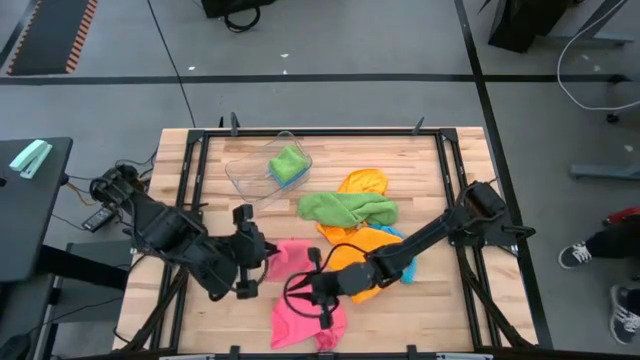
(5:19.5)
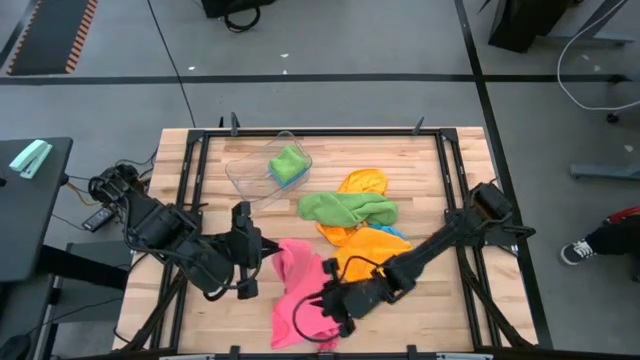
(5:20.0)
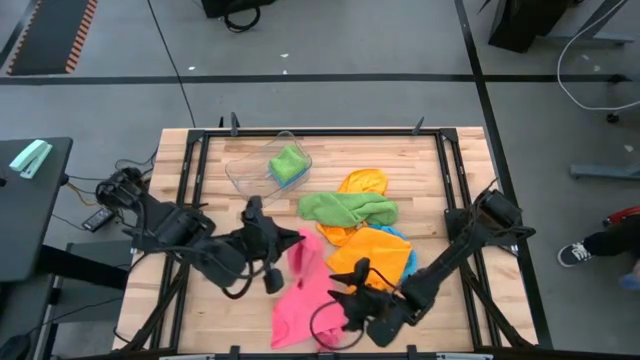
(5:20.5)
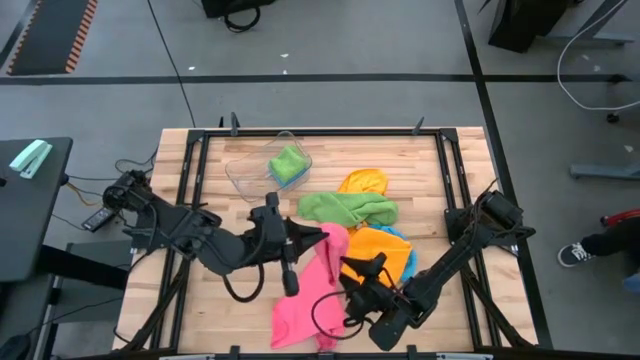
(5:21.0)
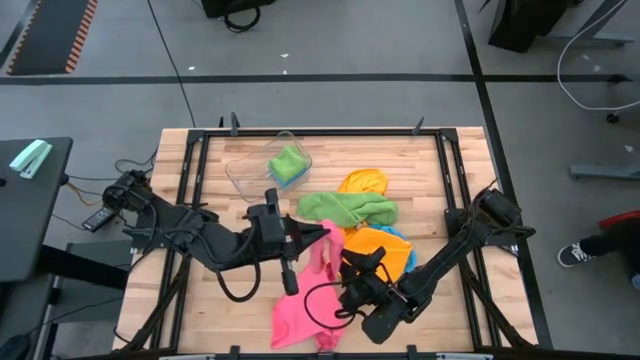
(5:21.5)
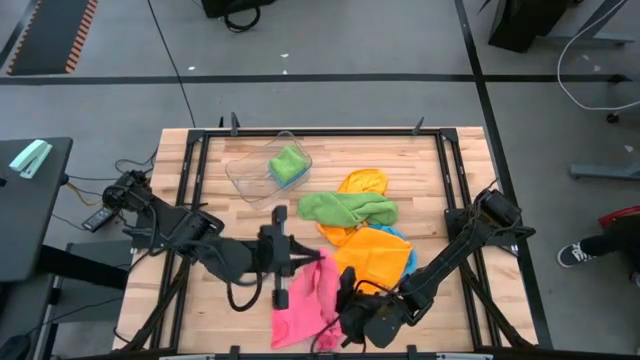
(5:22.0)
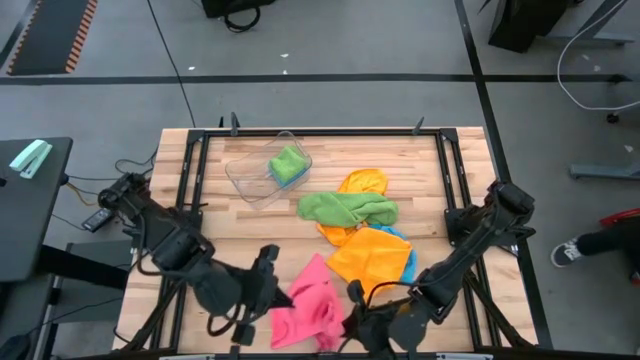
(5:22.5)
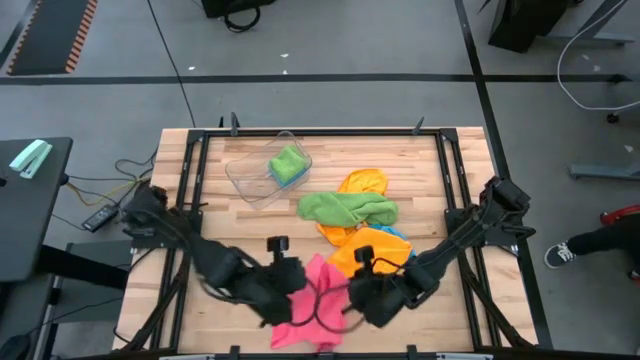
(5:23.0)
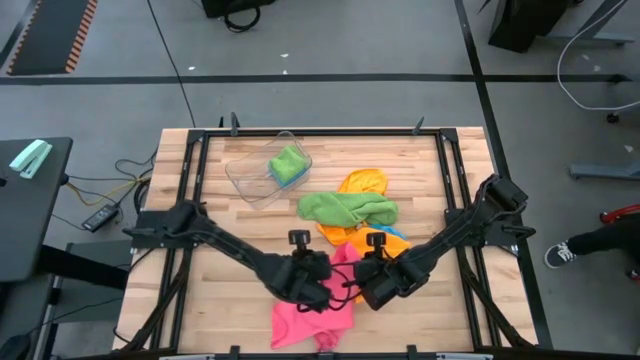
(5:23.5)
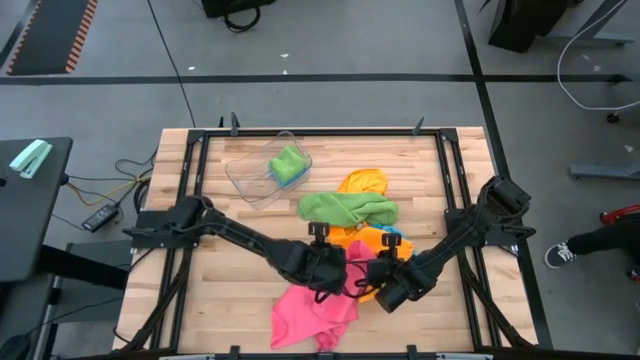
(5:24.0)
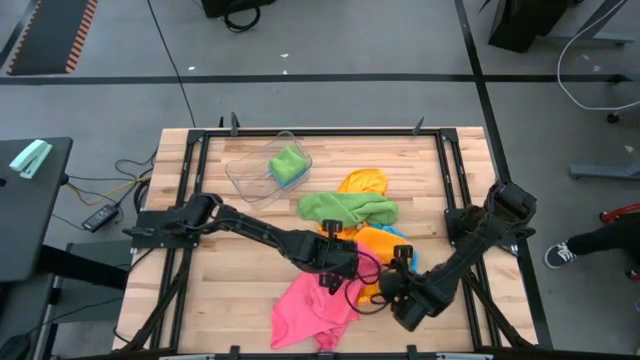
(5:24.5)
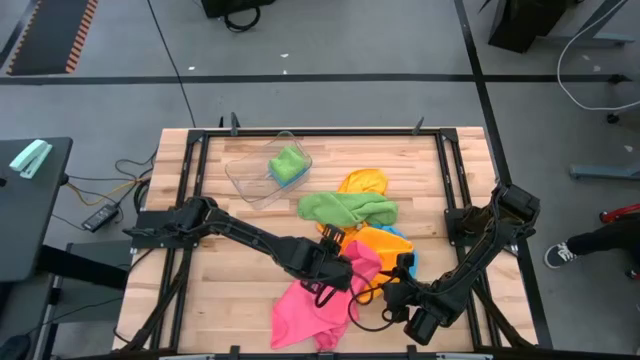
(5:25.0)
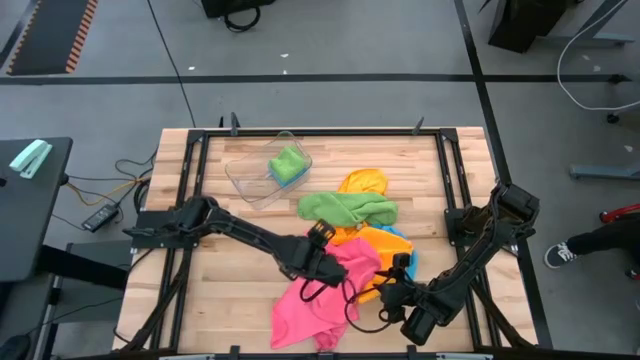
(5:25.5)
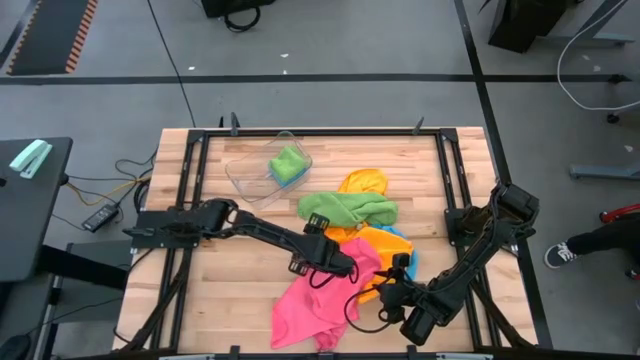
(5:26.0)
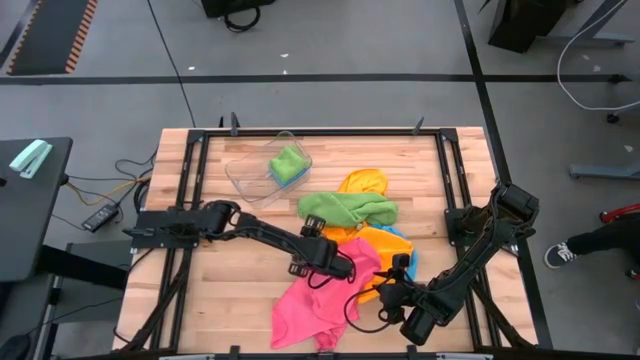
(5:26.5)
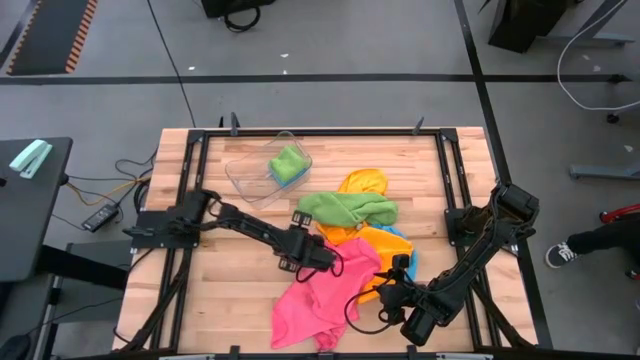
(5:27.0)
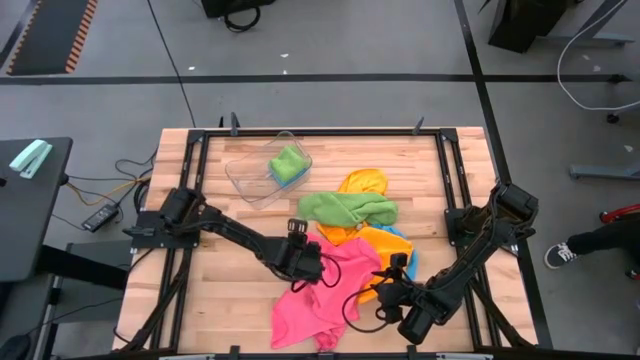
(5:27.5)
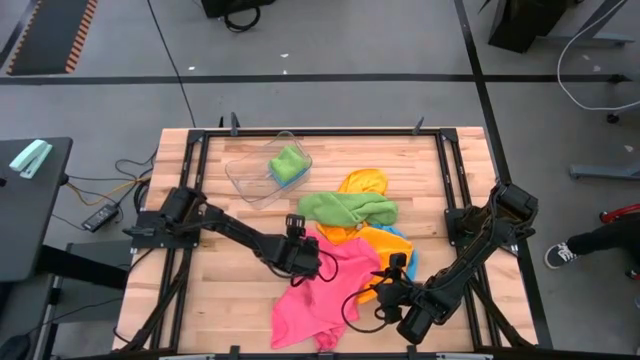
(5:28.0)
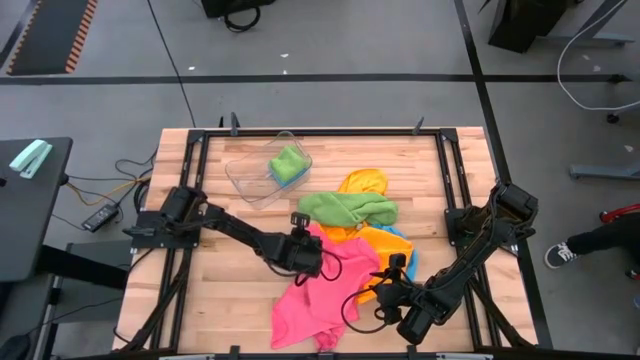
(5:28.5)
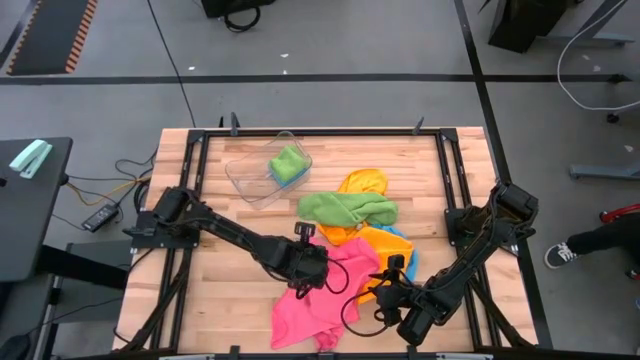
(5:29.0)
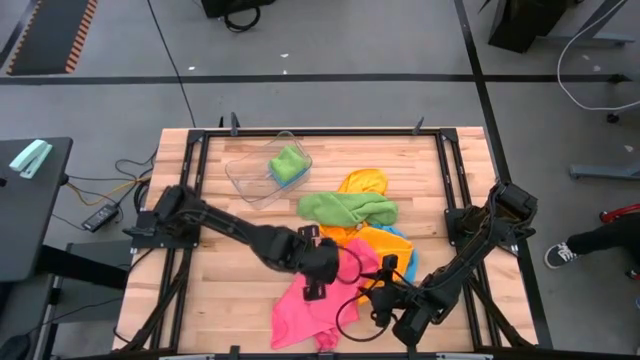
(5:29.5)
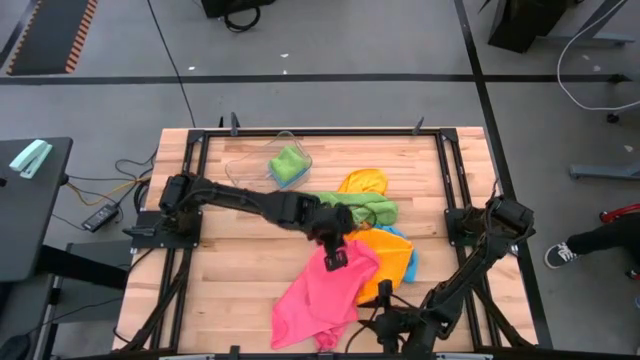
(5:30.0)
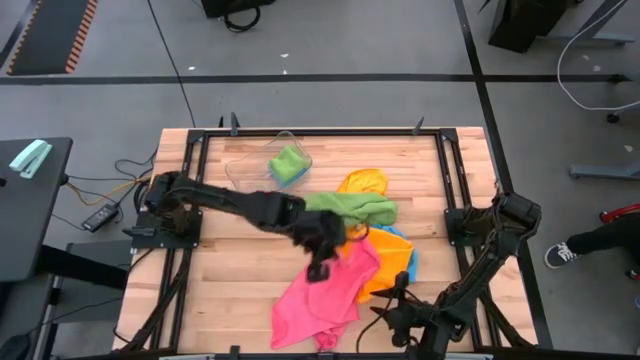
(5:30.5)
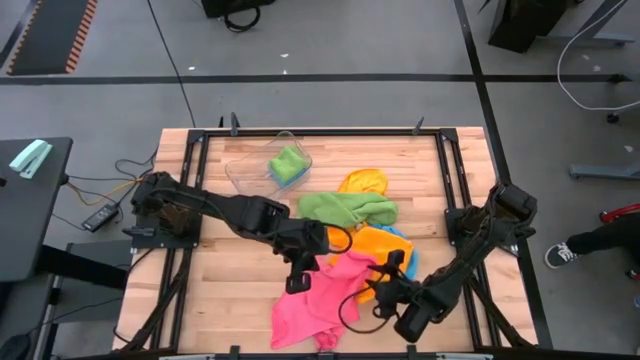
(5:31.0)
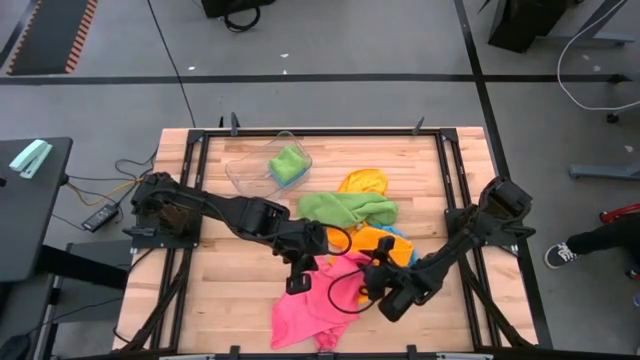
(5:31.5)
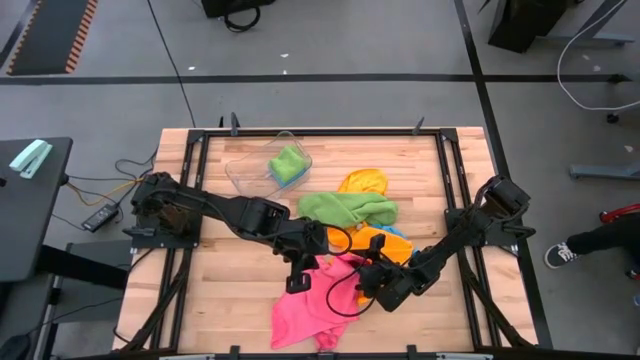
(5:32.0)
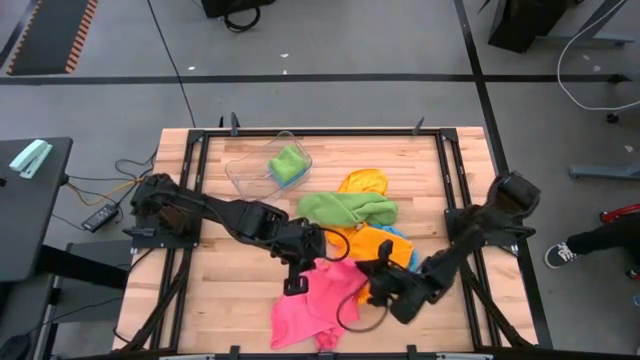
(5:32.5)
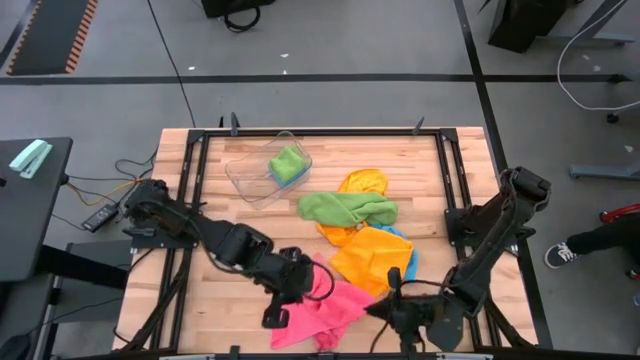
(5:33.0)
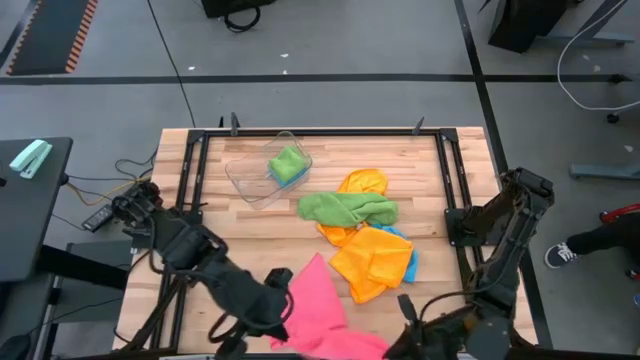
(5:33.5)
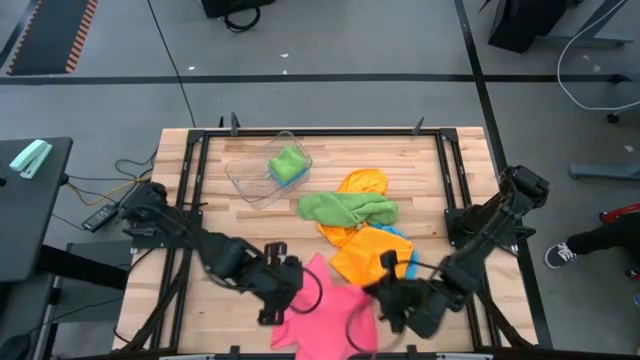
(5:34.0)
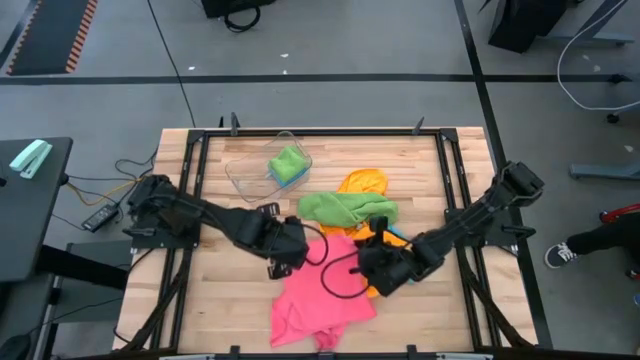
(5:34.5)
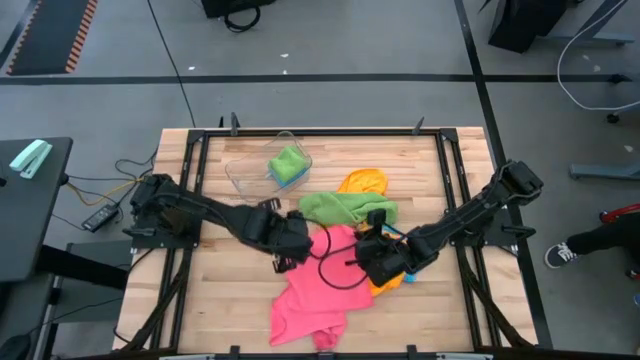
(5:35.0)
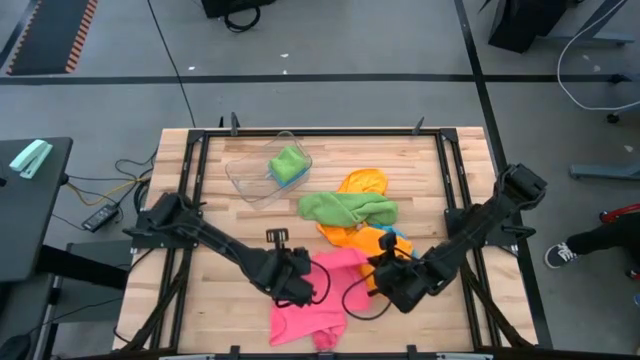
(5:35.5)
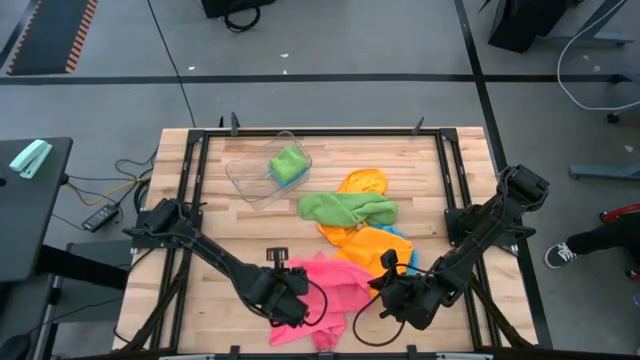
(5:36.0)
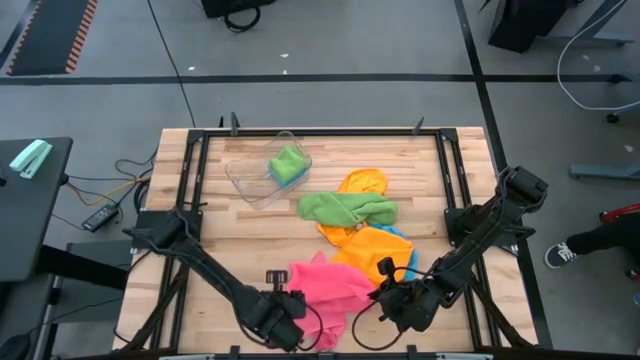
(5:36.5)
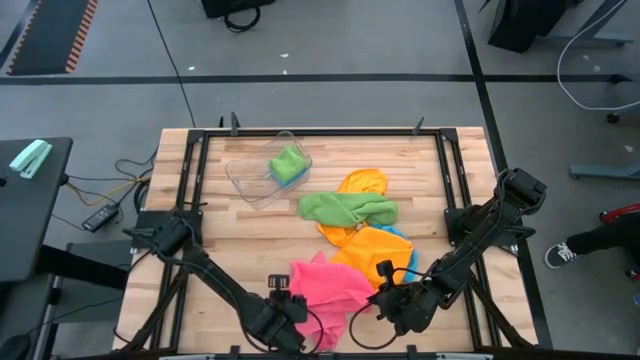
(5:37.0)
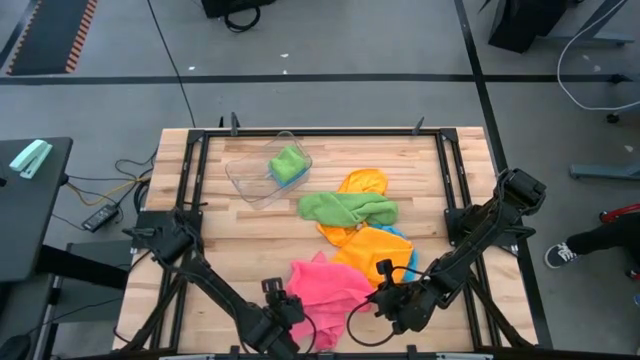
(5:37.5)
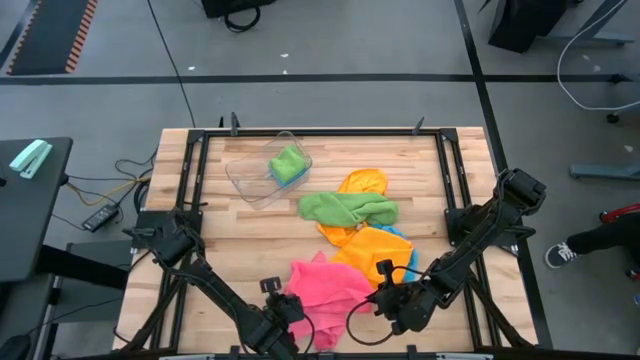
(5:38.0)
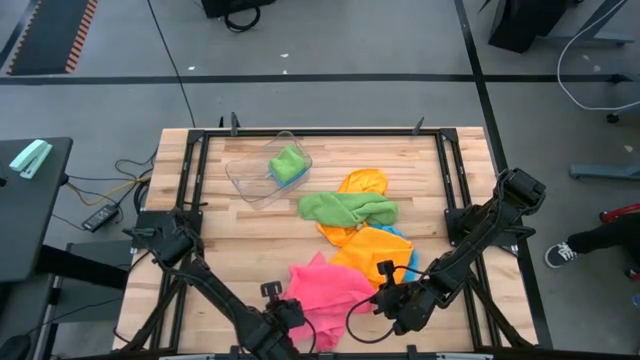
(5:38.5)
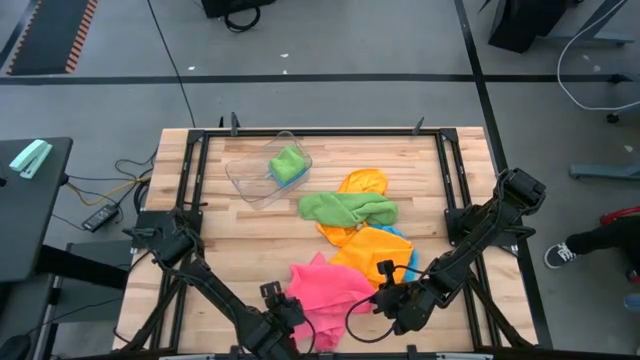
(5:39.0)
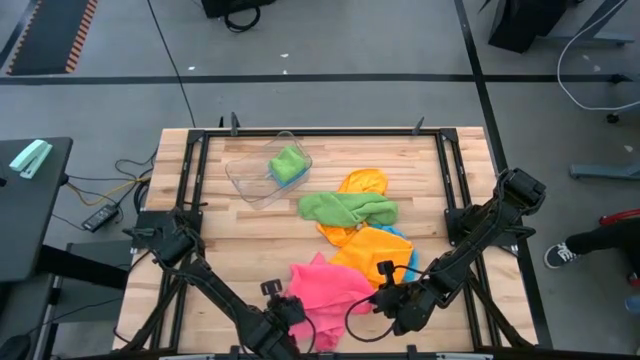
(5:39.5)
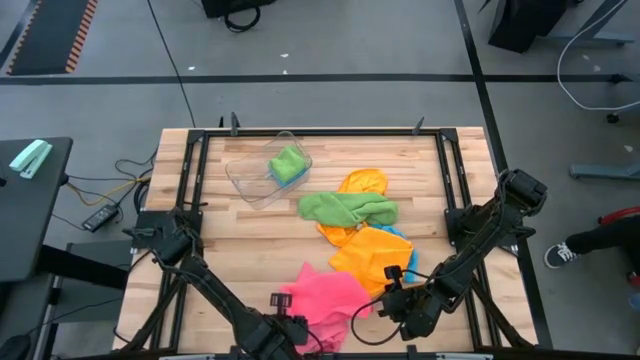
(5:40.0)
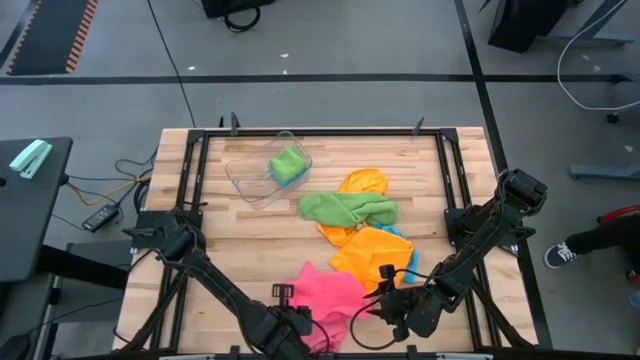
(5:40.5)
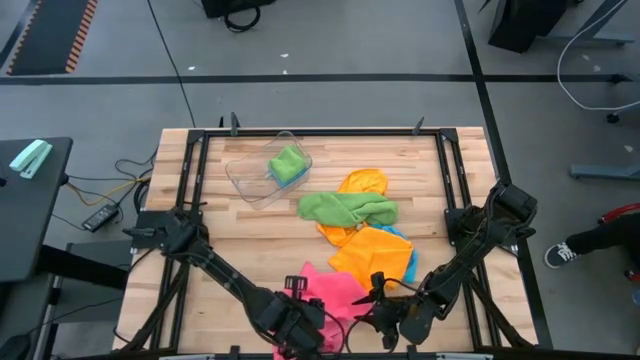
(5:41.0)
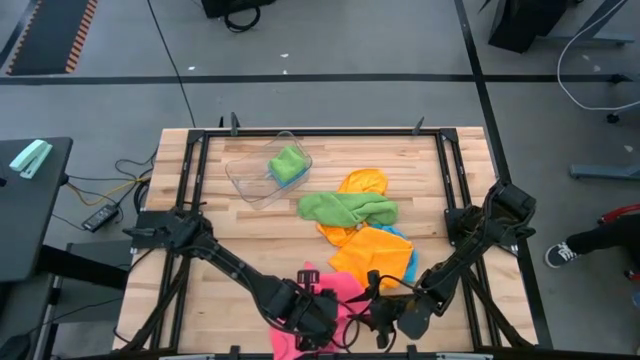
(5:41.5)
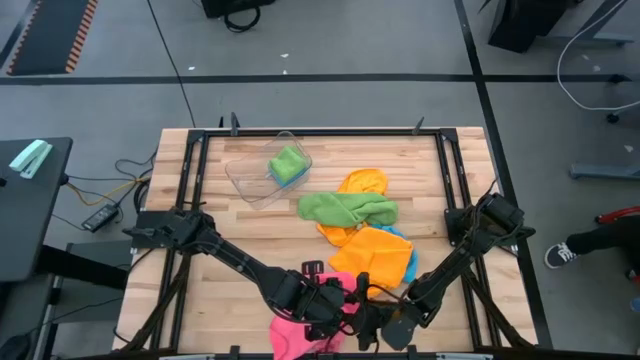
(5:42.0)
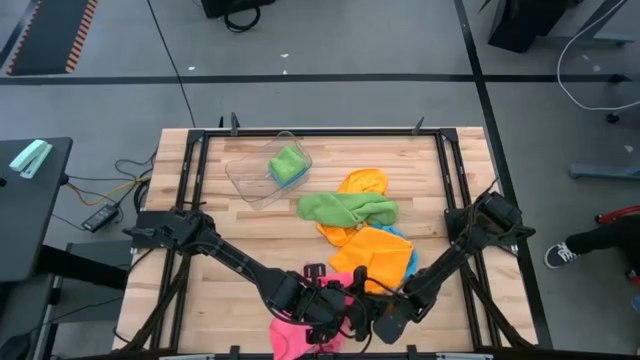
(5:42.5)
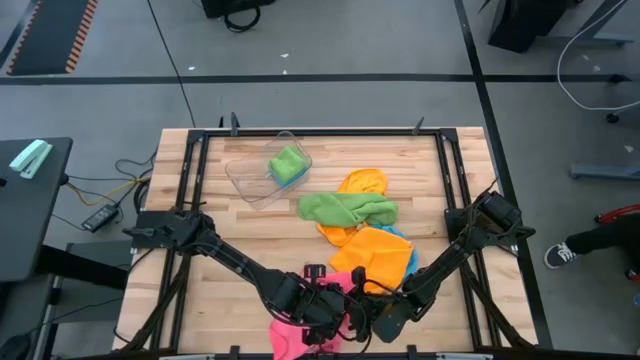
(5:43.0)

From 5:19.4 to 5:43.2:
Task: Fold microfiber towels
Fold the left pink microfiber towel
